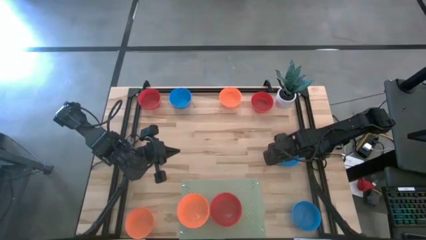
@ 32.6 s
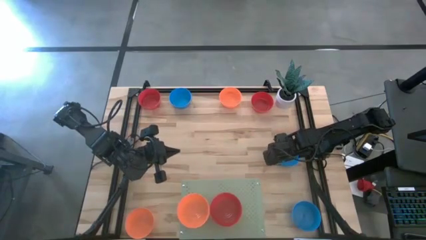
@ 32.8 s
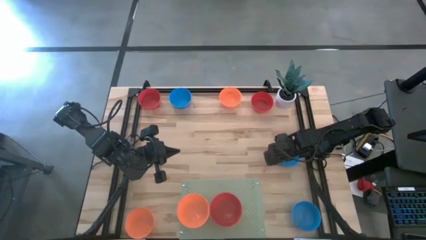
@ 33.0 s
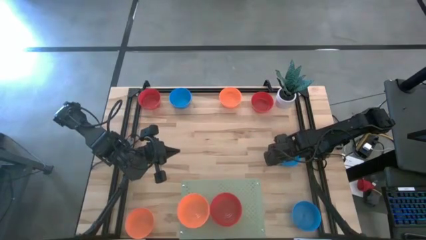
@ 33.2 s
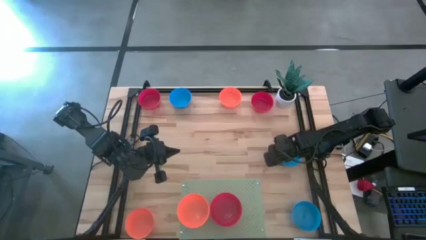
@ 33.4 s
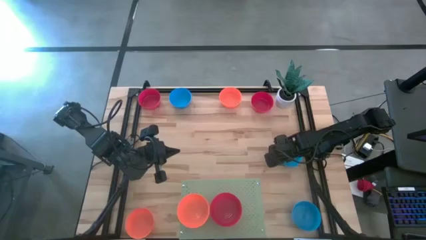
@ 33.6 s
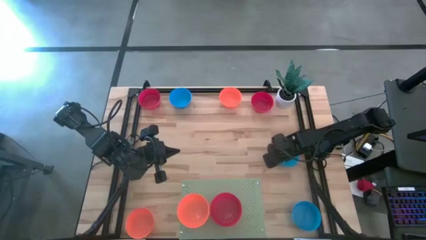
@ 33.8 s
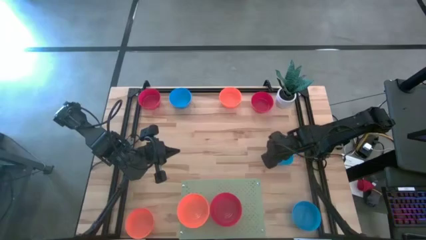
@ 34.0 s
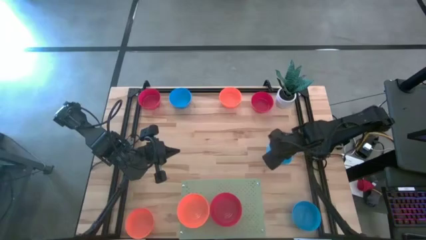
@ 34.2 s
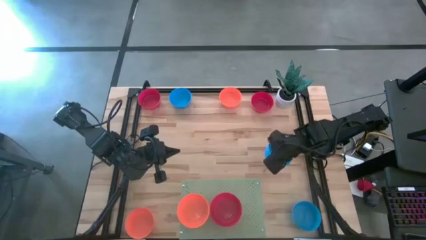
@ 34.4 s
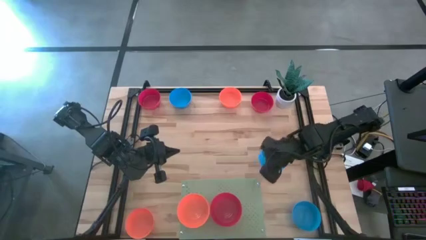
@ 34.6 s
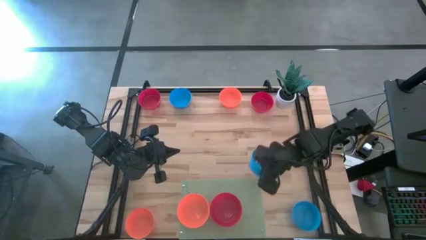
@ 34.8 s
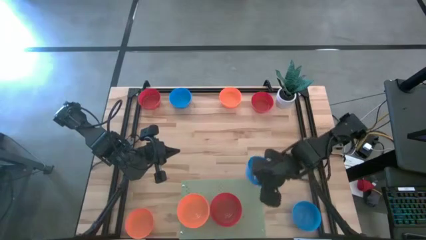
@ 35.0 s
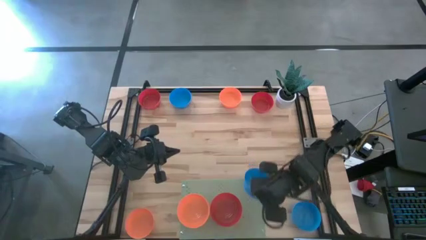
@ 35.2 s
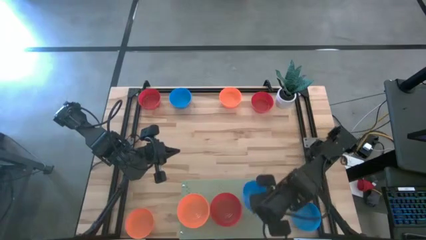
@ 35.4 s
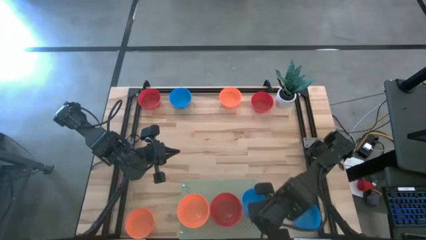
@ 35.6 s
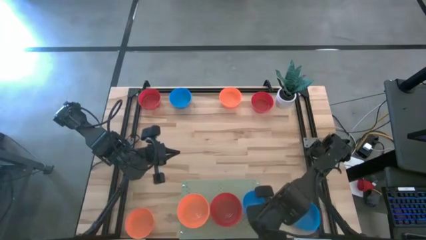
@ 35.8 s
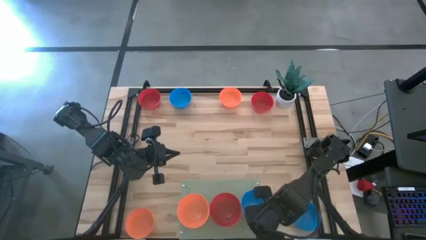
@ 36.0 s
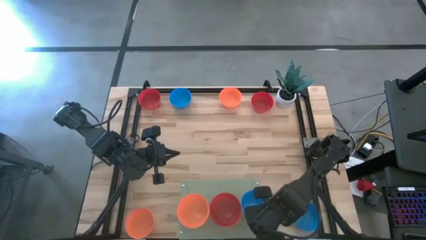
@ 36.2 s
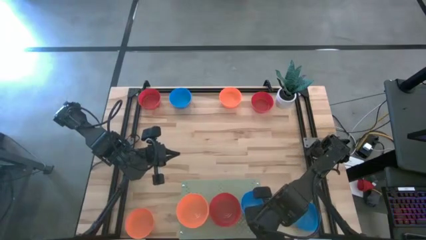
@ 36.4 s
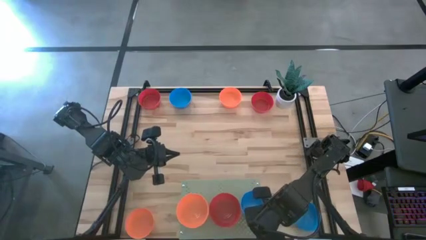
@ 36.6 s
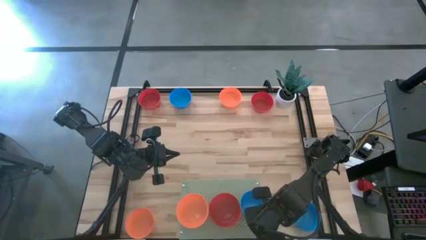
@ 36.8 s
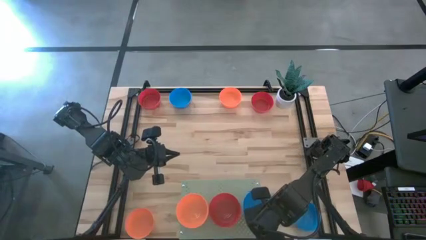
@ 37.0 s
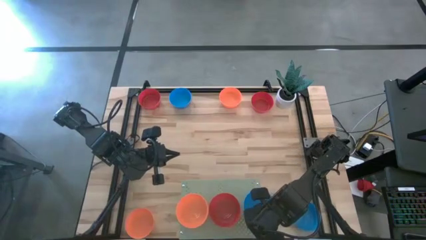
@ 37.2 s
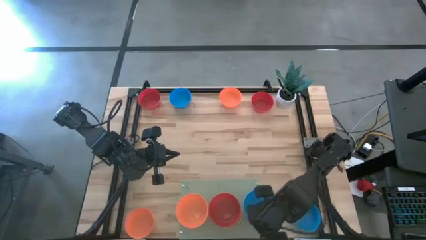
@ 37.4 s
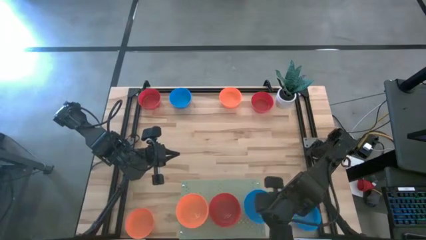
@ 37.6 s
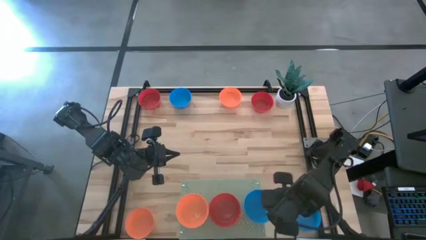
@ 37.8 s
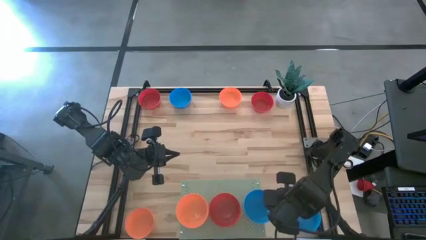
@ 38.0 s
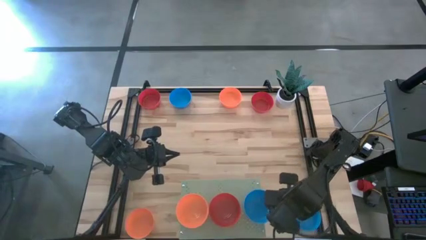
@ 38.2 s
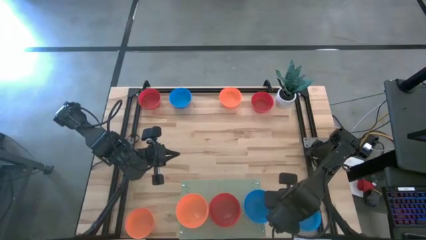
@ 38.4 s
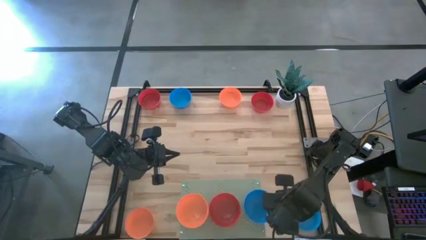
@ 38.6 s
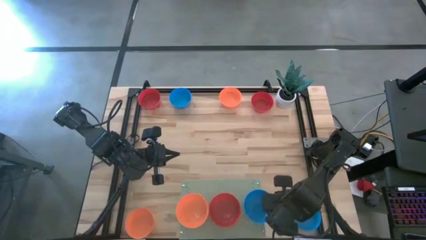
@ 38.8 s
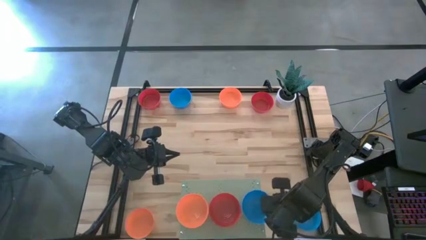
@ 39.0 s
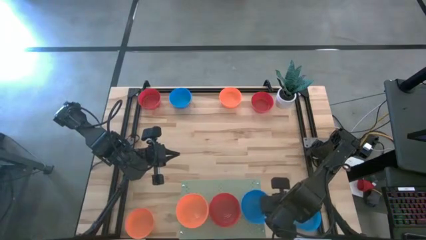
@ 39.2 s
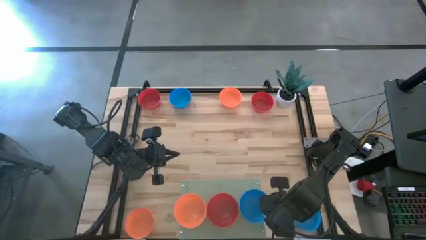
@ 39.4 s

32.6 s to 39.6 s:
Task: Pick & Place Mini bowls
Put the middle blue bowl on the shelf

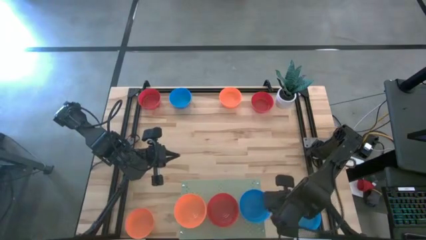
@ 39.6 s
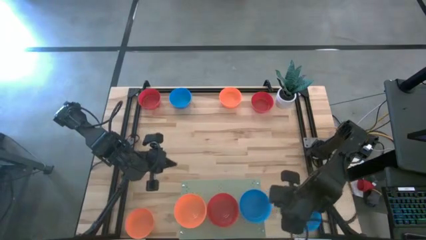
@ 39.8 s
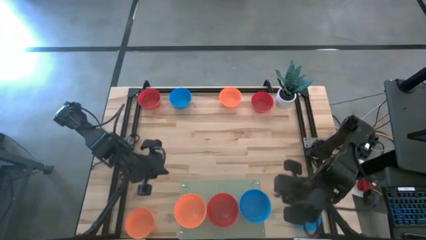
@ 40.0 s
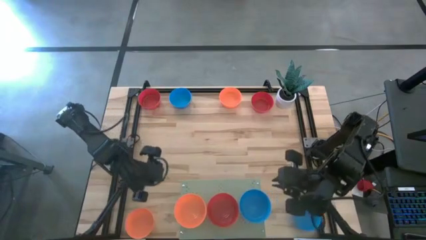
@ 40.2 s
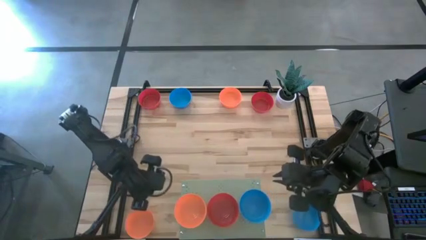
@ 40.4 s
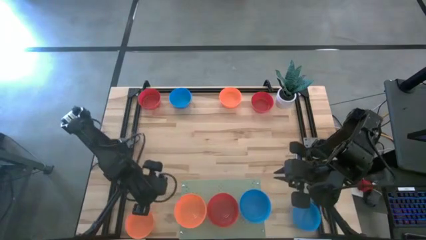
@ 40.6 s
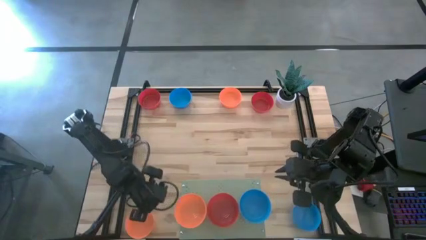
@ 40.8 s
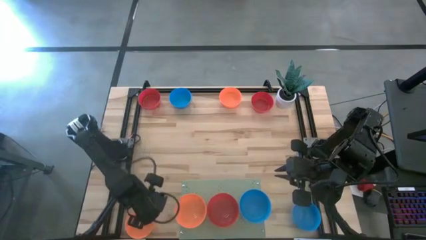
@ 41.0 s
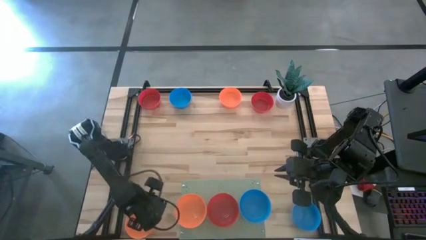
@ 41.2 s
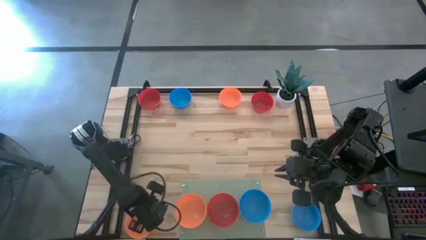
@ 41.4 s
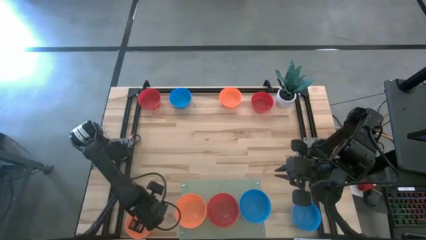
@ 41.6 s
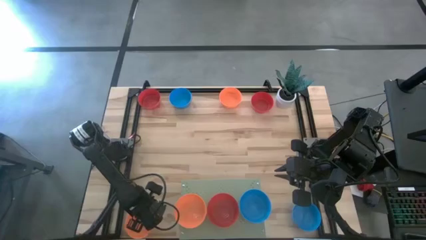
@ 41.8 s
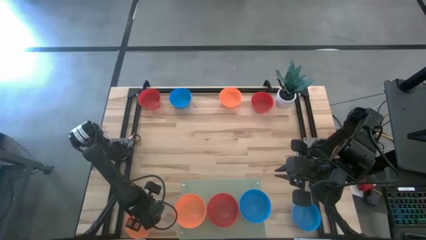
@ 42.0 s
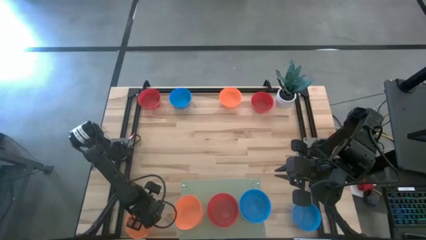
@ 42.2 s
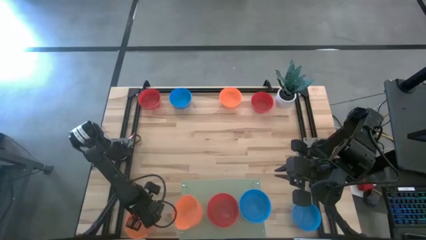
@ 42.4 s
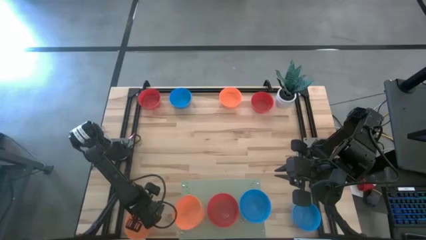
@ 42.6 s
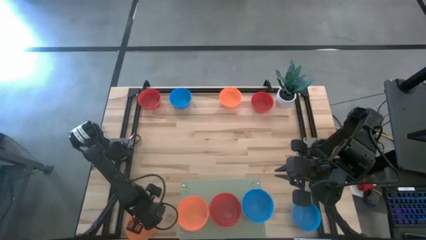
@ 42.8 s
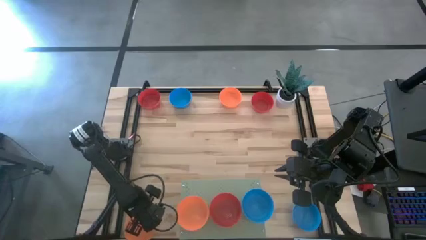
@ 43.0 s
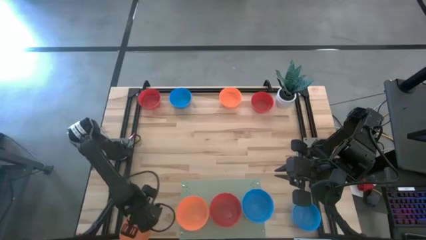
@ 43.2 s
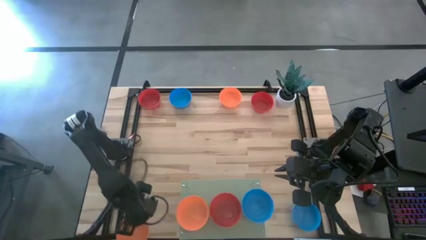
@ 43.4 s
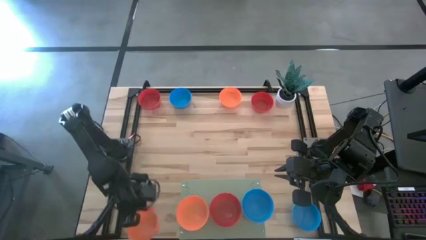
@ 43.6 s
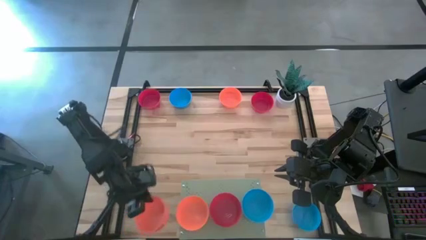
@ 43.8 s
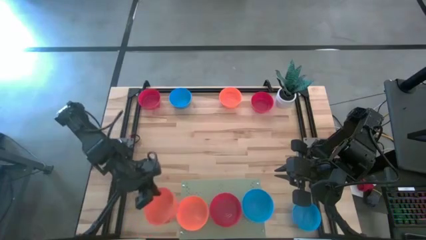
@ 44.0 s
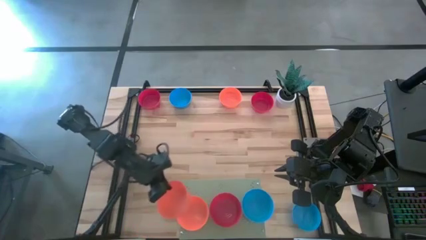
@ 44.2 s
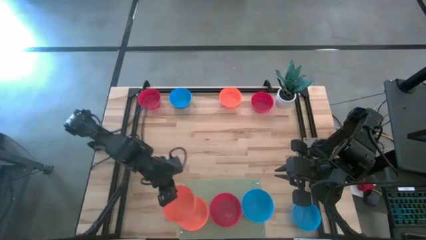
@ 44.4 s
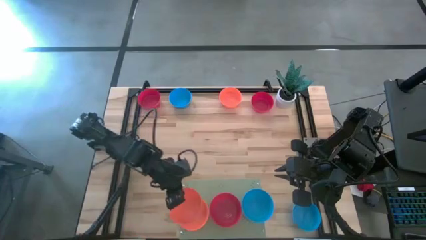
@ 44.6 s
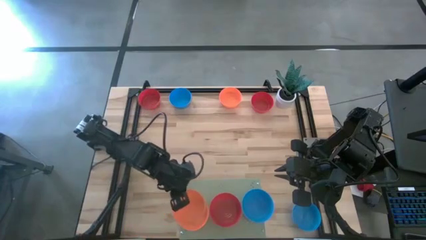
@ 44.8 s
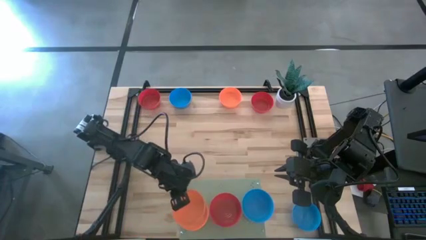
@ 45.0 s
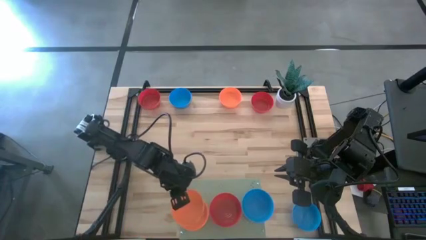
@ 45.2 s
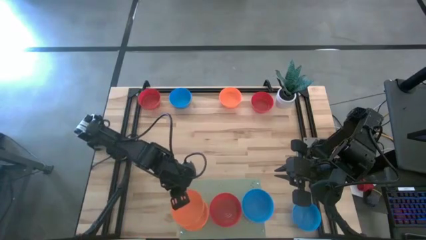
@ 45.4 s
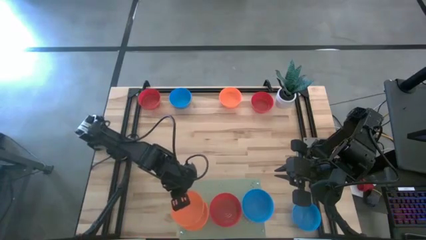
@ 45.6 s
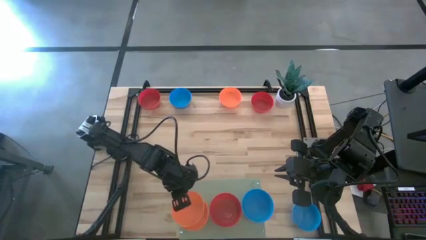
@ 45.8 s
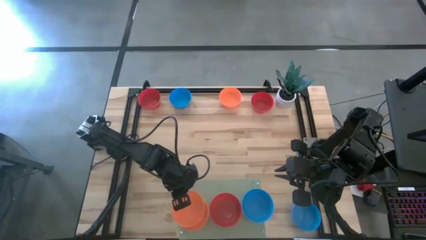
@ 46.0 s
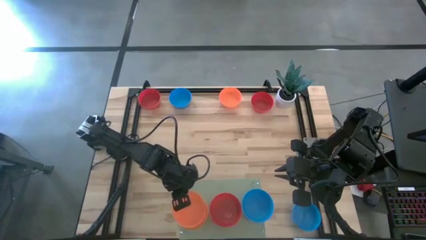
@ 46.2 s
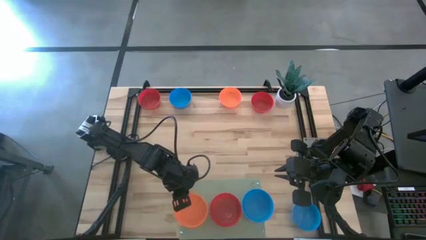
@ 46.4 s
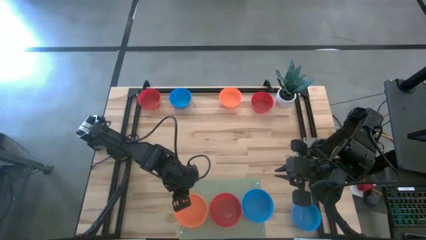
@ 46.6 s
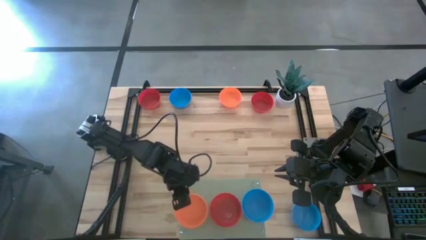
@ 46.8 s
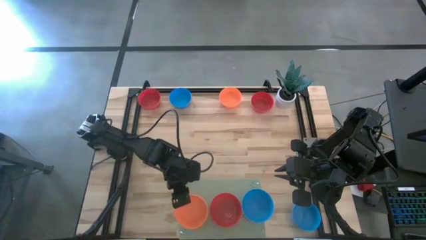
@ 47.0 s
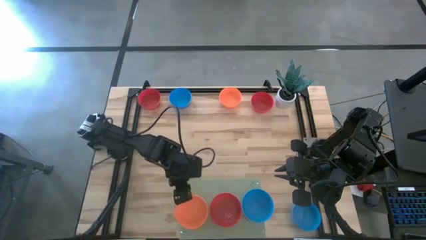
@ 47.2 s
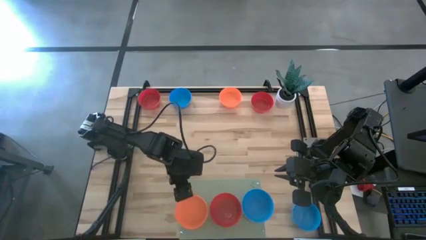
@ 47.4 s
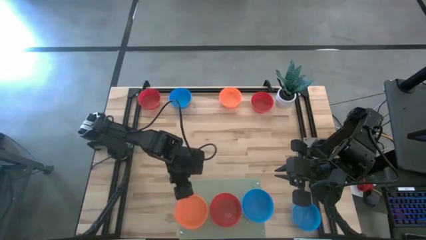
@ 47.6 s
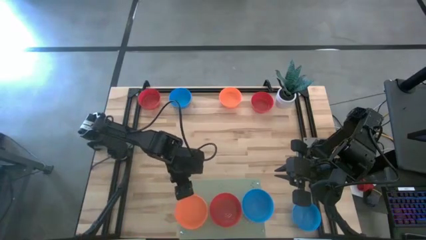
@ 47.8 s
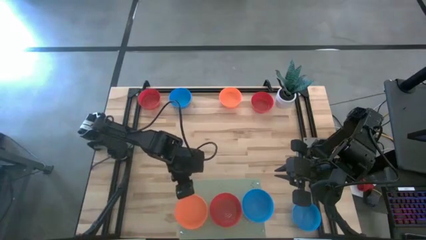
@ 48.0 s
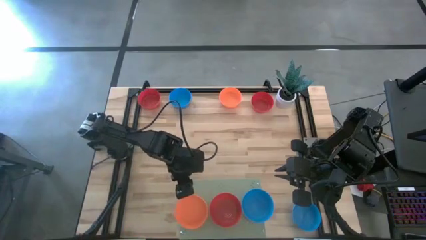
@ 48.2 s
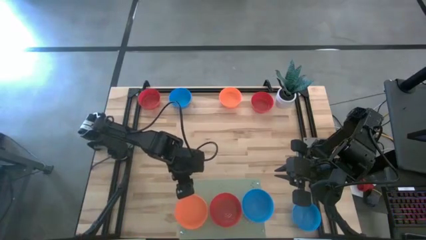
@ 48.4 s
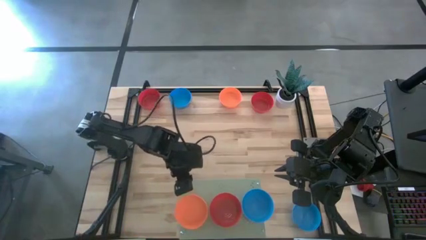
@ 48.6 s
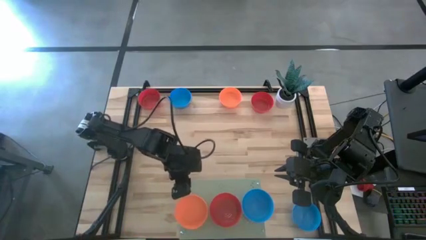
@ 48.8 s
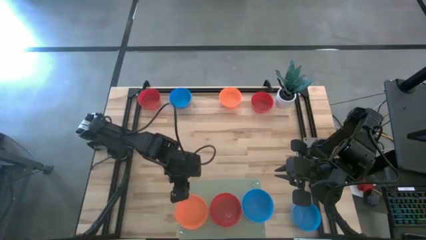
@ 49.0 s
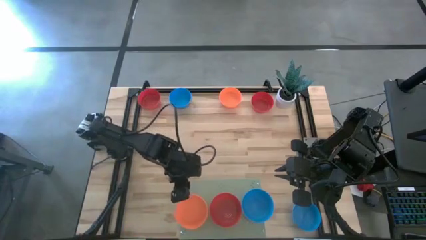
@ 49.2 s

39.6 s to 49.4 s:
Stack the bottom orange bowl on the orange bowl on the shelf
